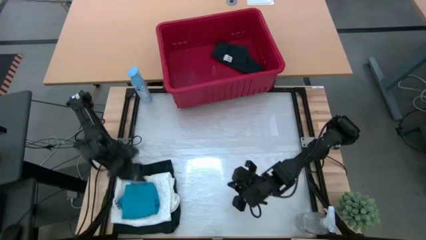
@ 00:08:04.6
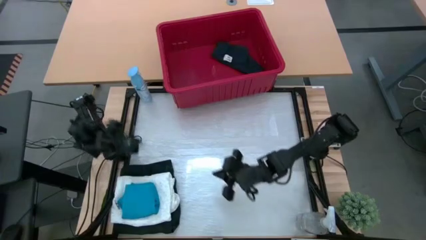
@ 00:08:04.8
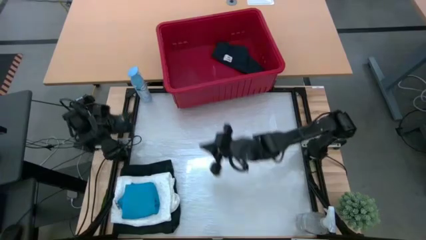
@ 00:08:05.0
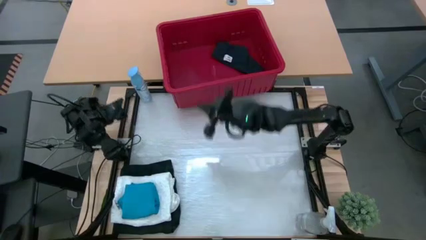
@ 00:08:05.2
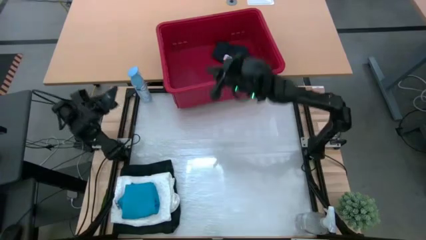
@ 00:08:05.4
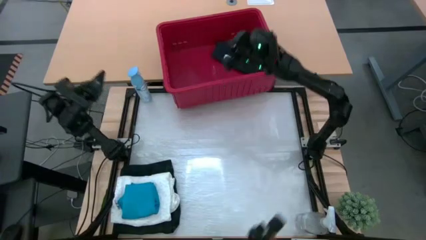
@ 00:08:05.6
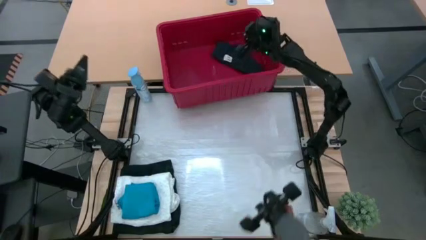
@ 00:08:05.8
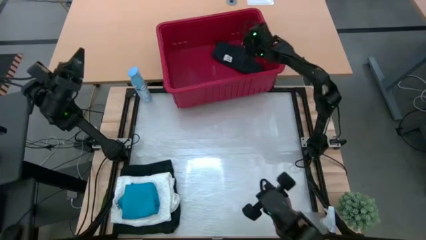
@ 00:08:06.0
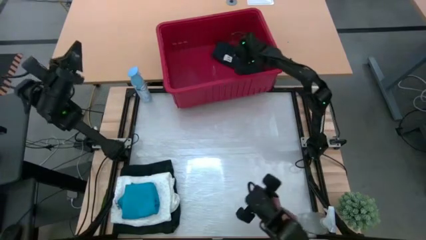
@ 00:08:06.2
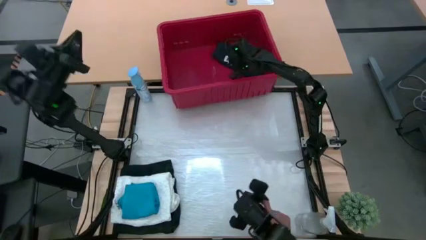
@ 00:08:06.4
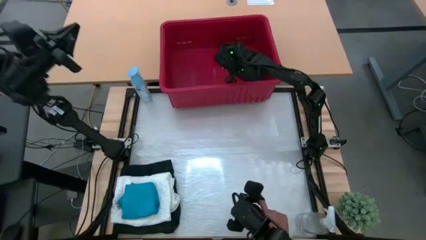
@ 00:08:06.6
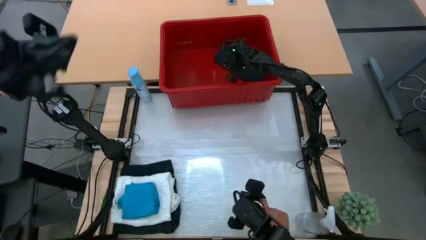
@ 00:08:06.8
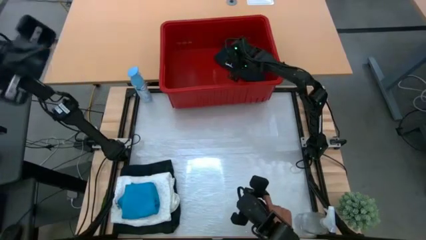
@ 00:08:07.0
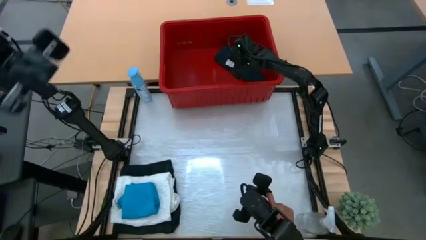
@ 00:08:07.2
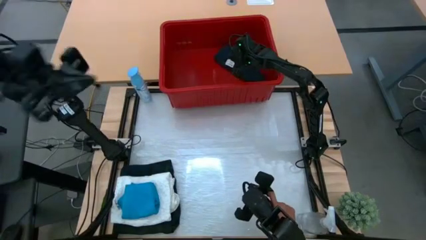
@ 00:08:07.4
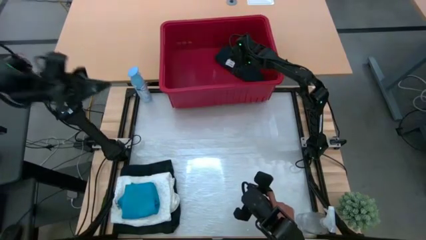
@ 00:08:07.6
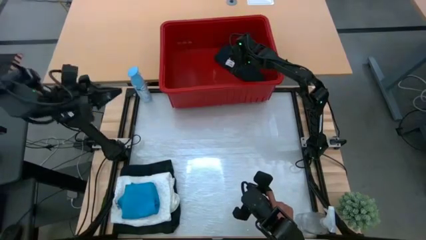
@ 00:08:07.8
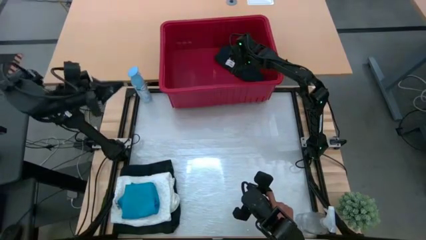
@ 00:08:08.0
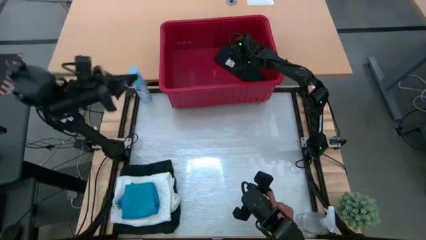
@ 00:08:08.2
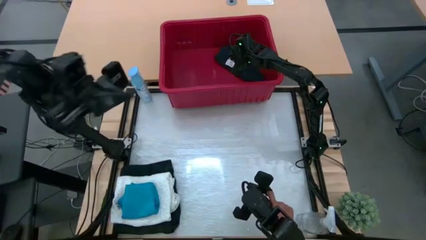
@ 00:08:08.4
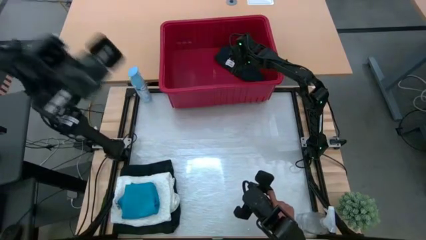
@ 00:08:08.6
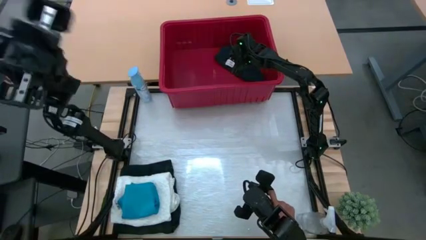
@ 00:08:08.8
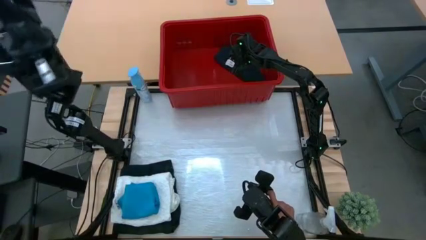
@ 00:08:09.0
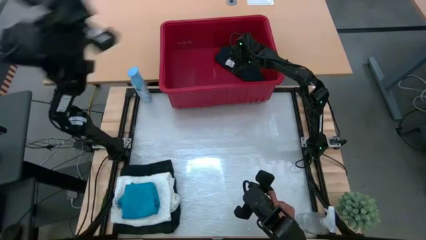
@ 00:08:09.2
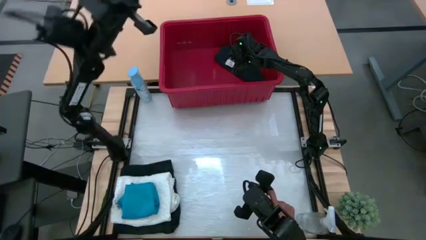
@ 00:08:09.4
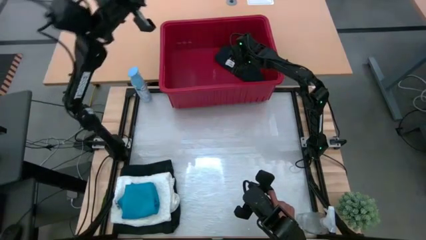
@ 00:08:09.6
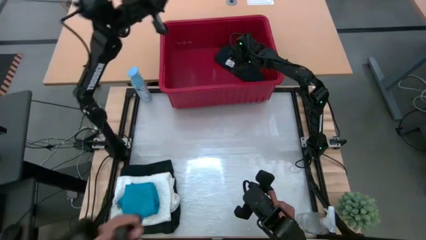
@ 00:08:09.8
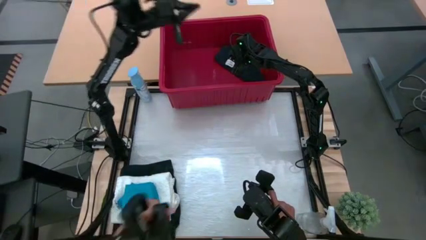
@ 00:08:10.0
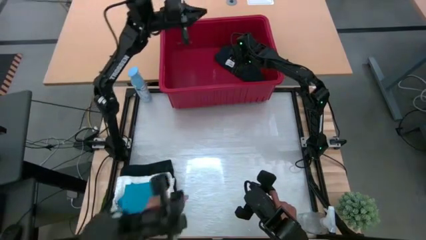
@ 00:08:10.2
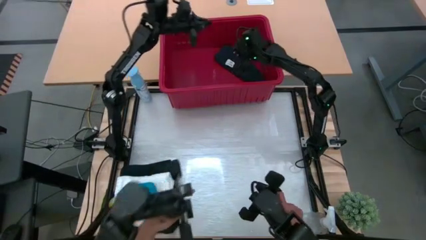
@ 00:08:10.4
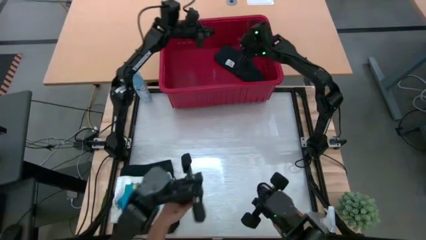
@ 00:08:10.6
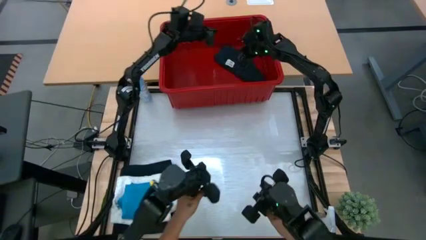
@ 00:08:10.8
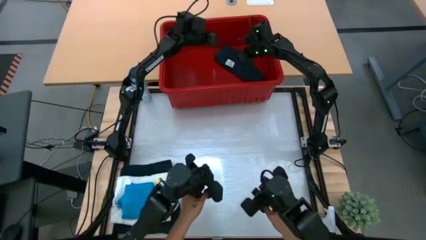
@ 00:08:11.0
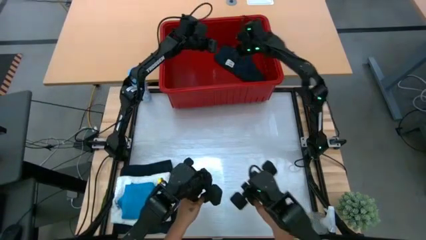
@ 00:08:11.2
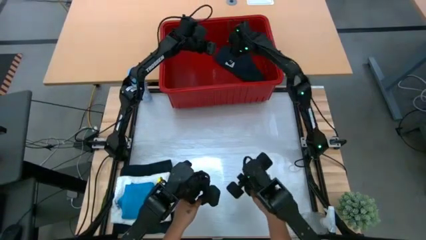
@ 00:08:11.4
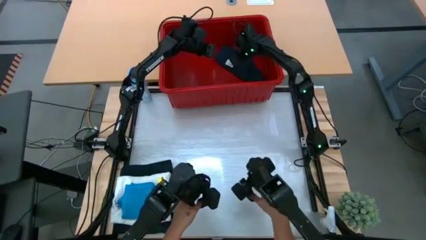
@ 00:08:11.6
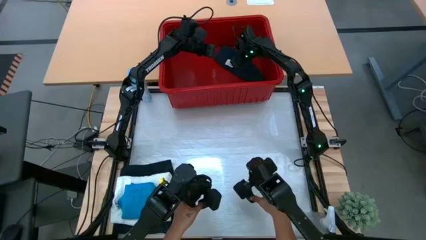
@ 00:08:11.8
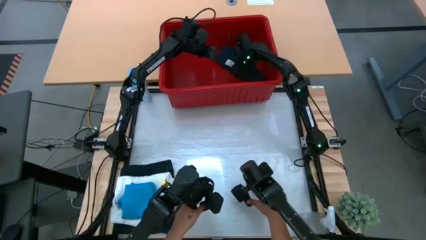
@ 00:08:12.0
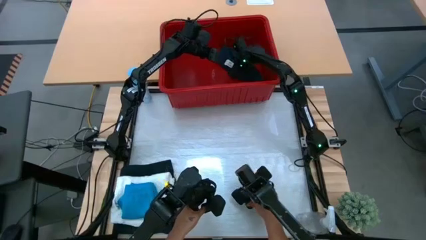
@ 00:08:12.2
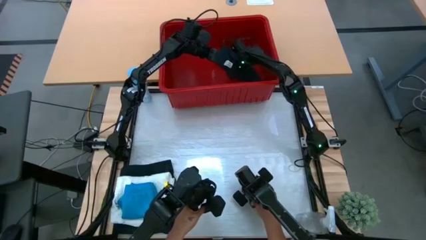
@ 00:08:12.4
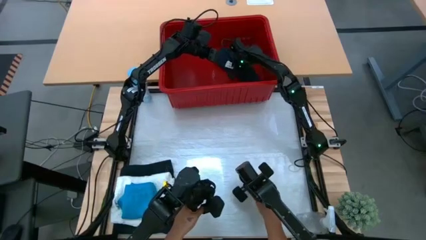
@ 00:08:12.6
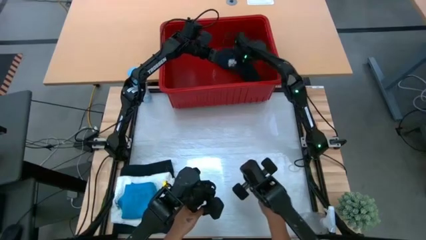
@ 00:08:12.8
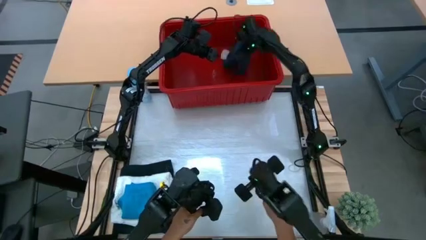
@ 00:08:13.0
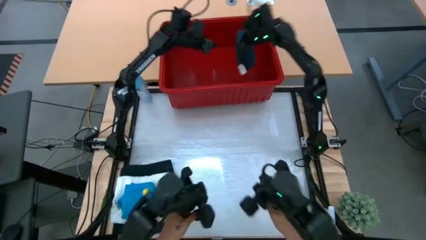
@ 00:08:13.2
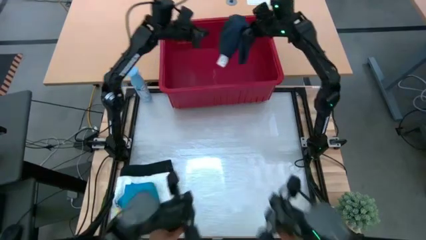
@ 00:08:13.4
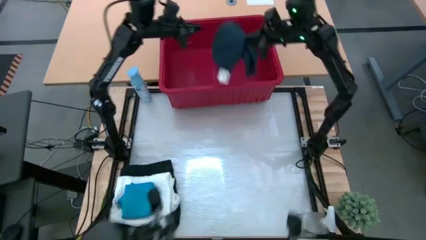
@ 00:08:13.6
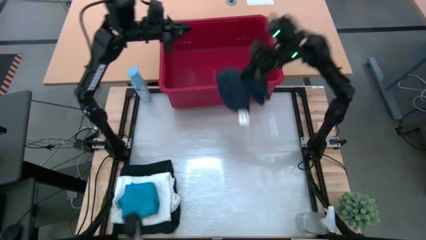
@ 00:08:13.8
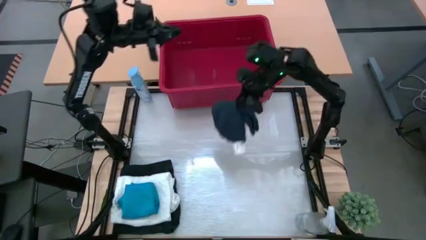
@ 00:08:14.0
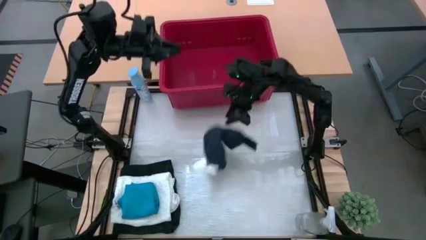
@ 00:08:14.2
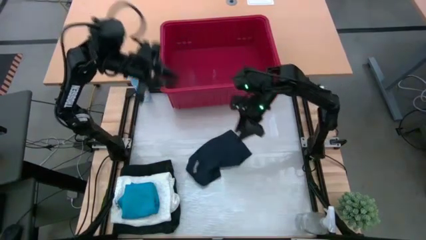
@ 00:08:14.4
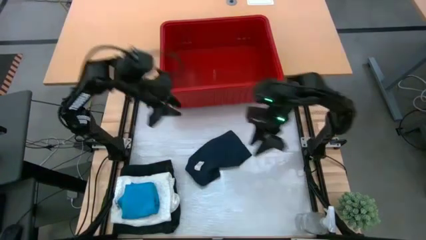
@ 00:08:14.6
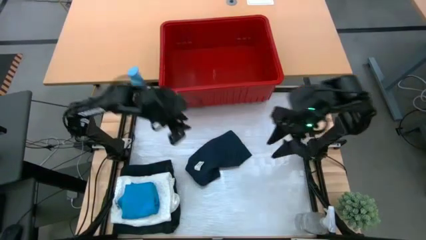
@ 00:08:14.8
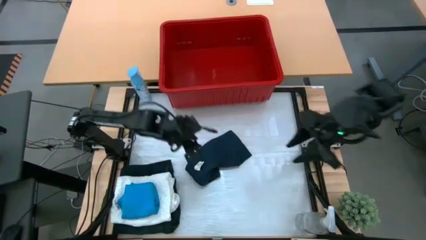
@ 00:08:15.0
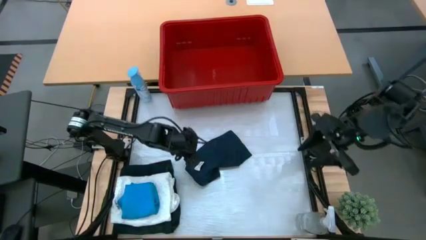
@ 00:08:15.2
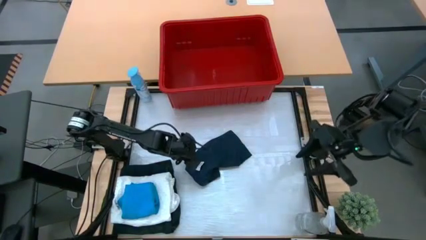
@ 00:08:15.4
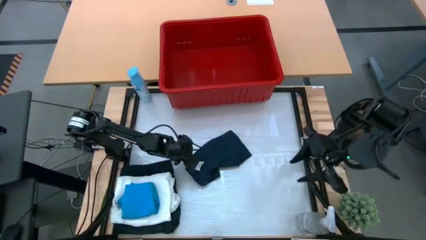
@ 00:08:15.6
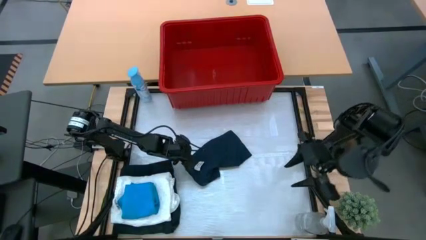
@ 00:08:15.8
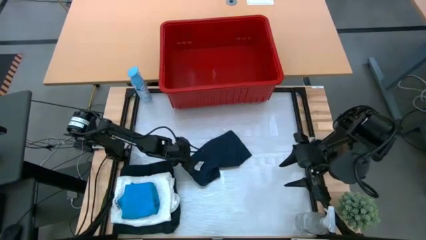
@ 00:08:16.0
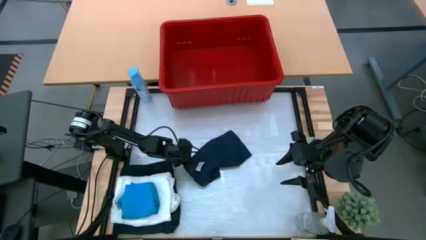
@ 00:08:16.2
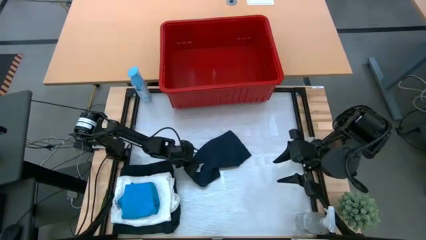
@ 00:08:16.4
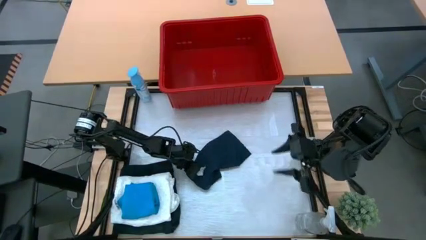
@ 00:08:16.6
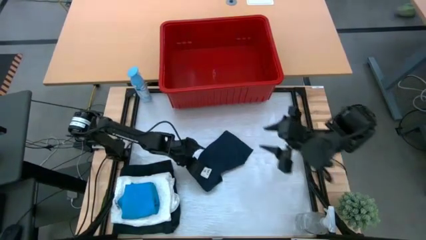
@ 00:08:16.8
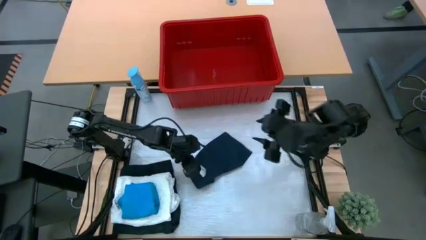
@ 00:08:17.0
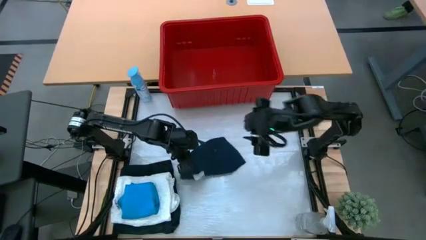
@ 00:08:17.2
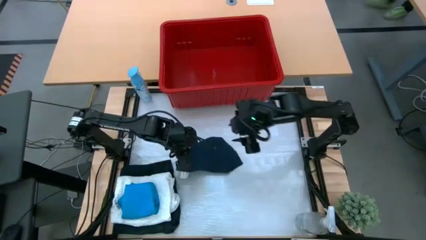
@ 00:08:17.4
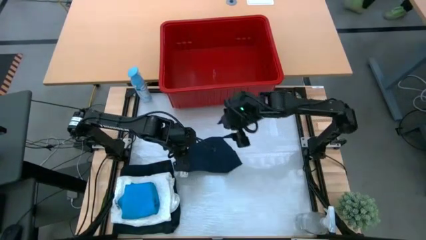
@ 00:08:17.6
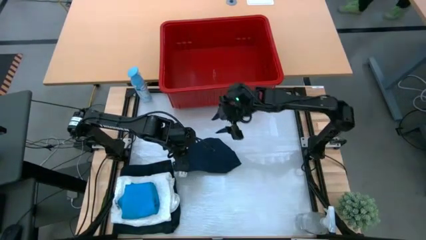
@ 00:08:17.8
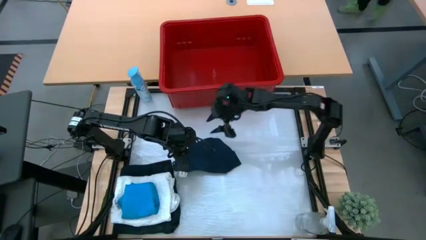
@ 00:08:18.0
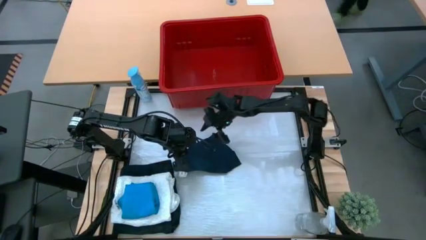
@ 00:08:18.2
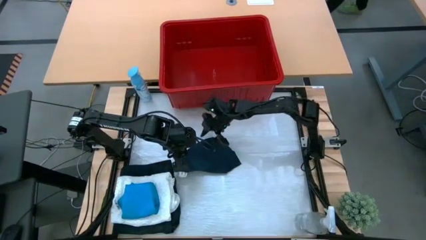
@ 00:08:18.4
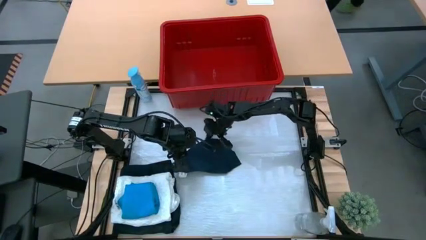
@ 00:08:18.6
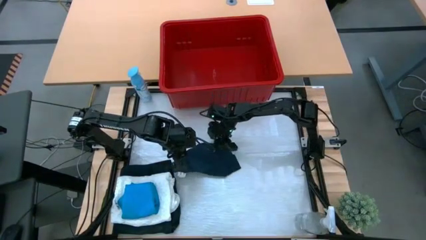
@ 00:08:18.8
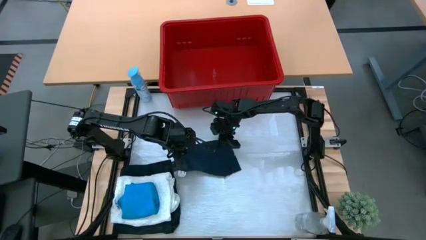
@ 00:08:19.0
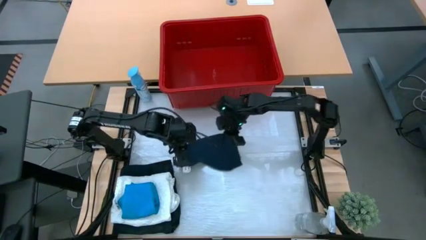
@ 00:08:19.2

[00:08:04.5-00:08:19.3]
Task: Fold Laundry from Bin
Fold the gray shorts from the red bin

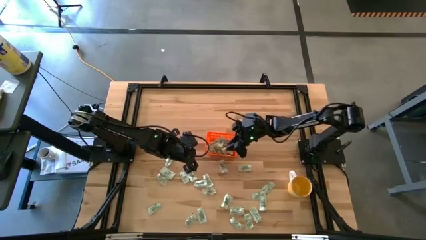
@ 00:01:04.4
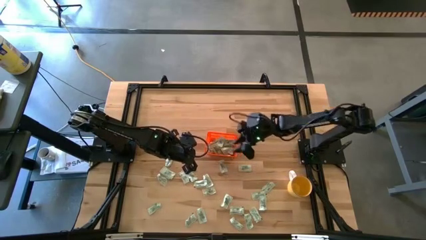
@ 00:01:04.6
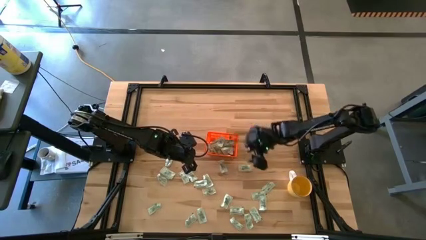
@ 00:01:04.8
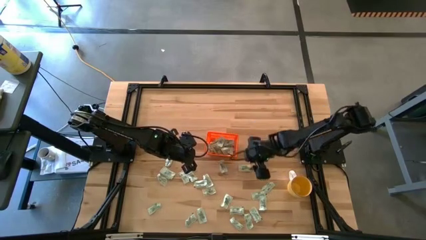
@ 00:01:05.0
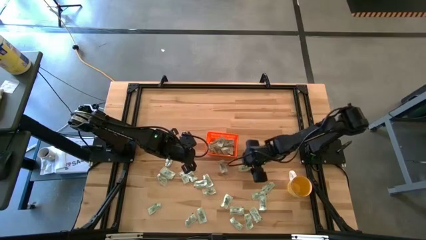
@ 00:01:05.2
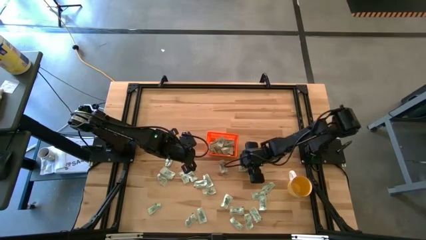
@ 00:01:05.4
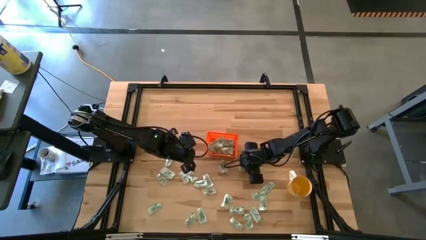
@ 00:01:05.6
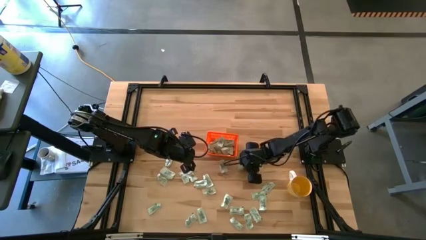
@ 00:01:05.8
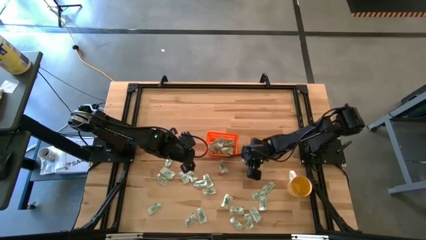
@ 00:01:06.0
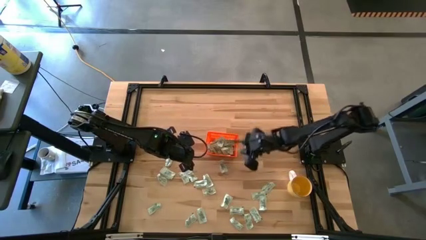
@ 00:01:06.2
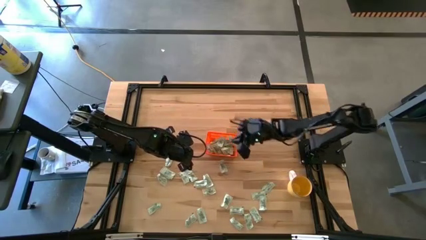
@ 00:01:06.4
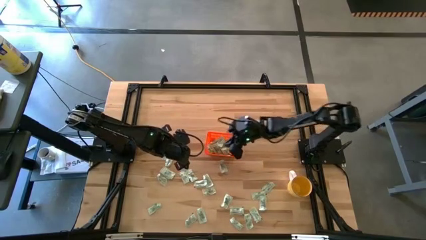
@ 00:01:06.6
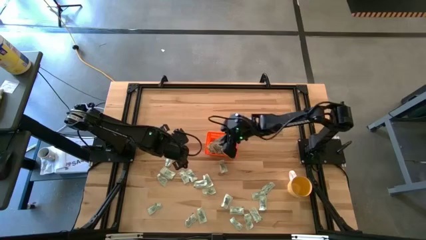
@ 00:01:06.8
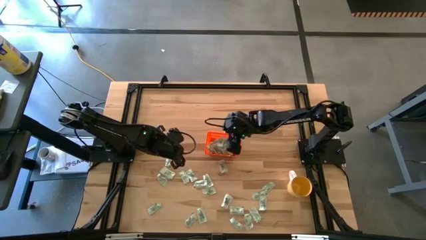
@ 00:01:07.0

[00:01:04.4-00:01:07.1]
Task: Pick and place Stevia / Truvia into bins
Put the light green stevia packet into the orange bin
